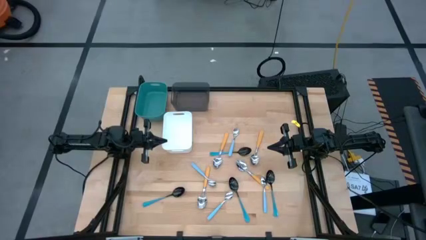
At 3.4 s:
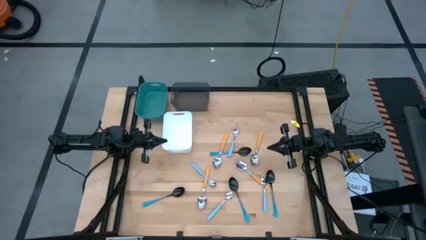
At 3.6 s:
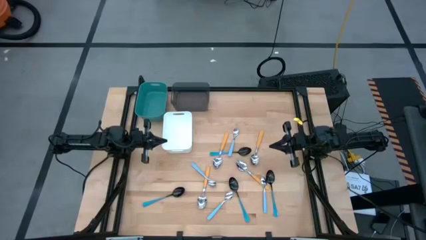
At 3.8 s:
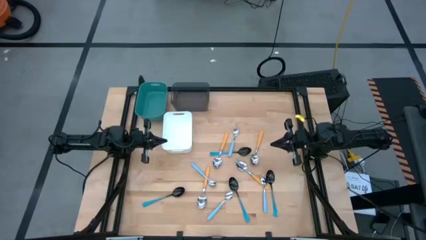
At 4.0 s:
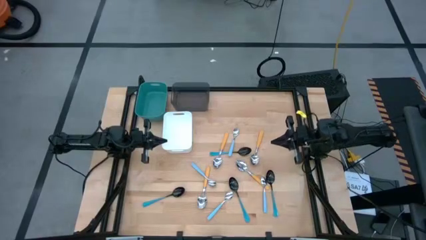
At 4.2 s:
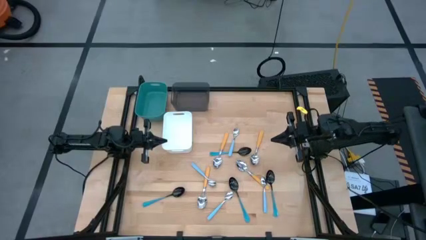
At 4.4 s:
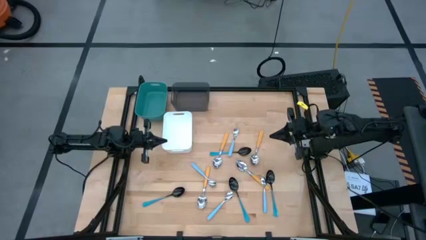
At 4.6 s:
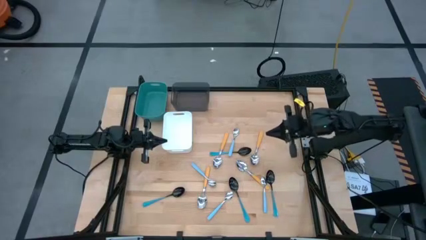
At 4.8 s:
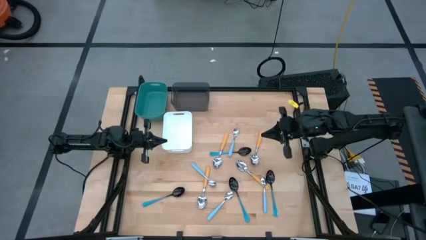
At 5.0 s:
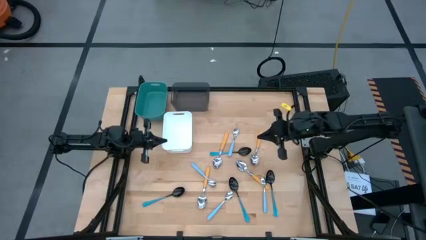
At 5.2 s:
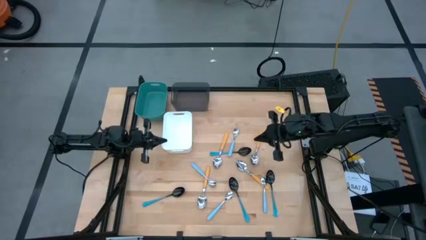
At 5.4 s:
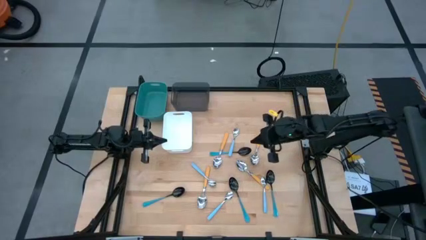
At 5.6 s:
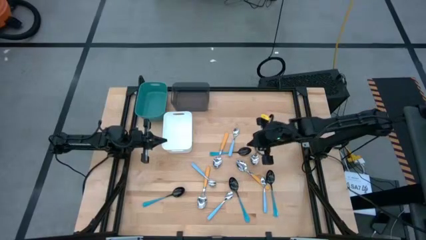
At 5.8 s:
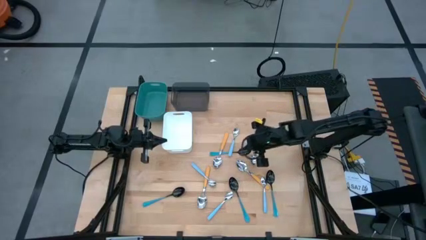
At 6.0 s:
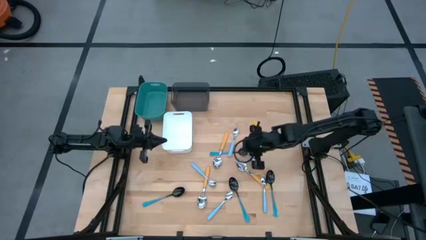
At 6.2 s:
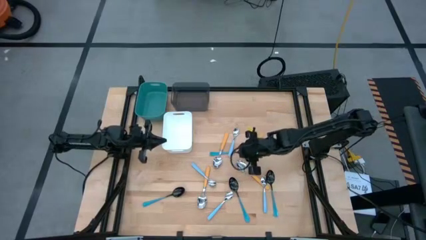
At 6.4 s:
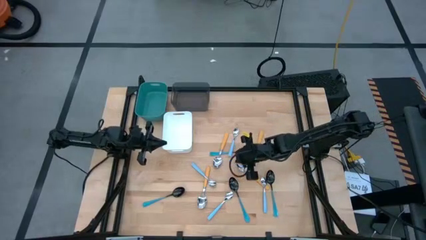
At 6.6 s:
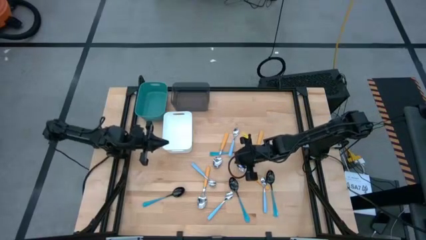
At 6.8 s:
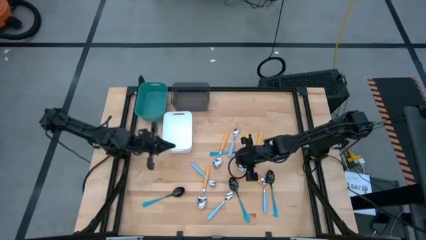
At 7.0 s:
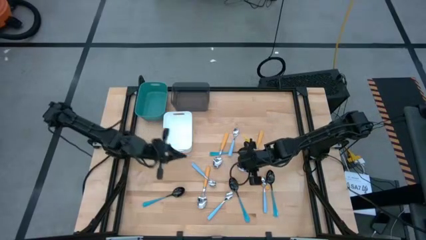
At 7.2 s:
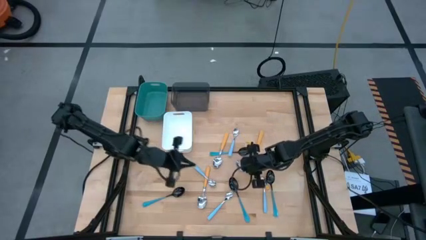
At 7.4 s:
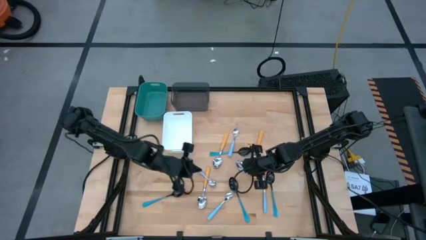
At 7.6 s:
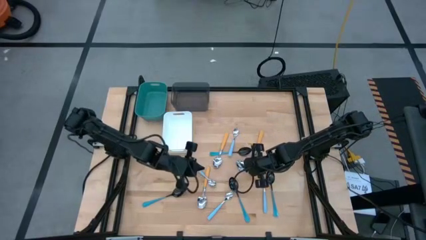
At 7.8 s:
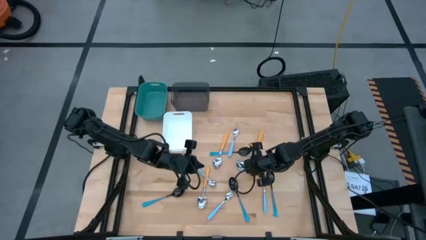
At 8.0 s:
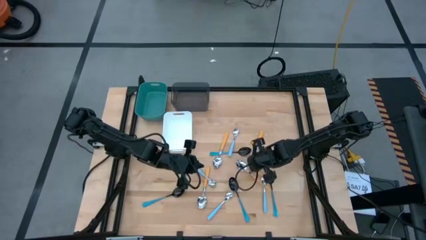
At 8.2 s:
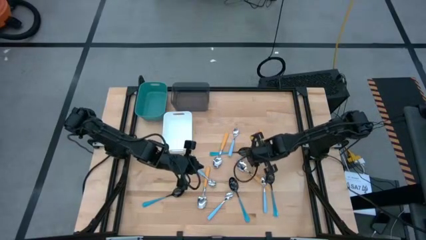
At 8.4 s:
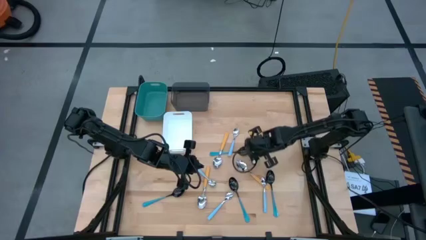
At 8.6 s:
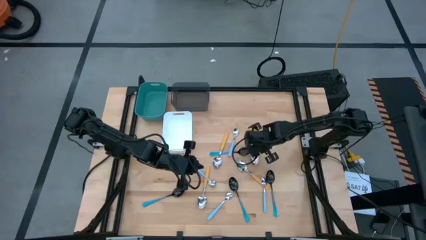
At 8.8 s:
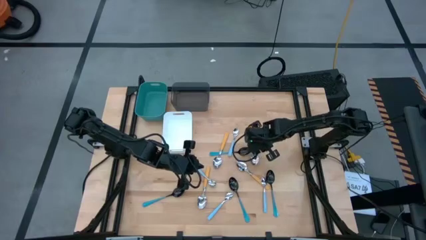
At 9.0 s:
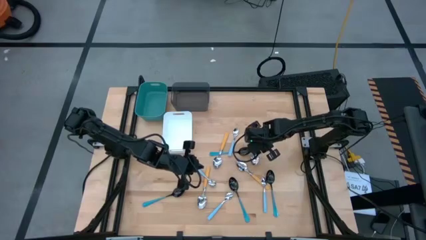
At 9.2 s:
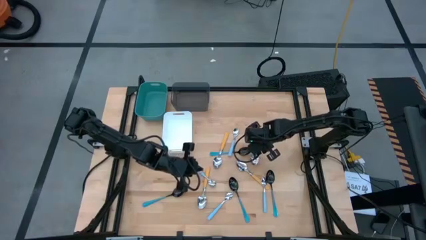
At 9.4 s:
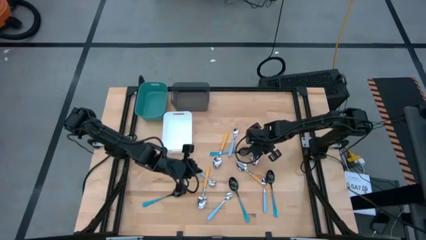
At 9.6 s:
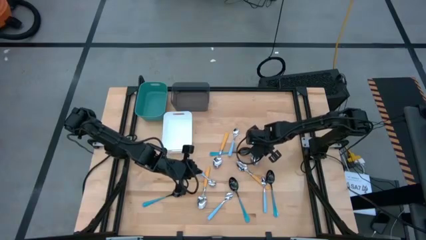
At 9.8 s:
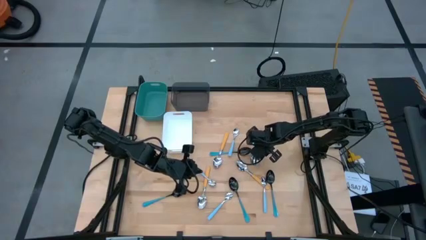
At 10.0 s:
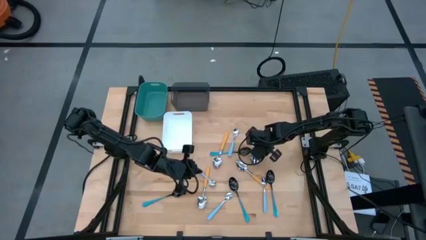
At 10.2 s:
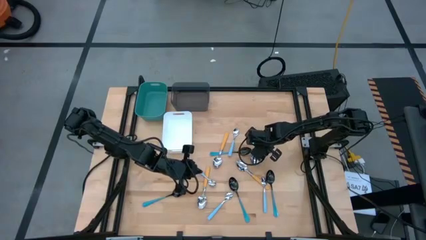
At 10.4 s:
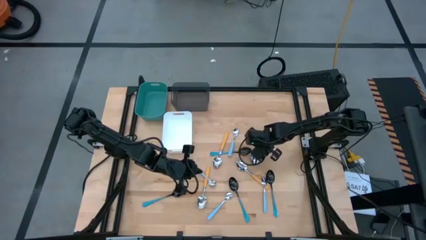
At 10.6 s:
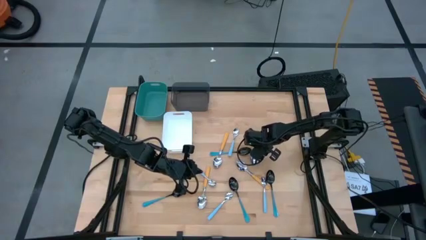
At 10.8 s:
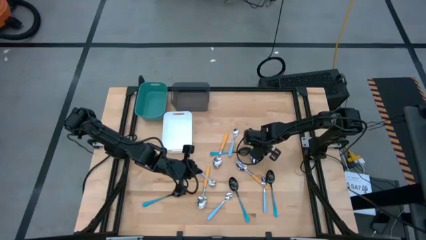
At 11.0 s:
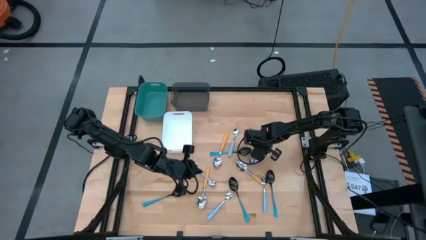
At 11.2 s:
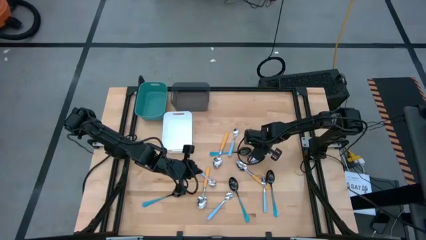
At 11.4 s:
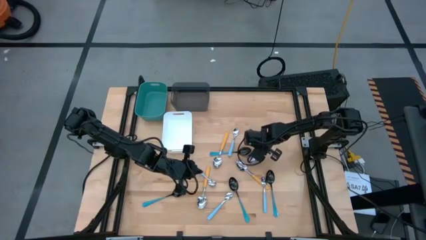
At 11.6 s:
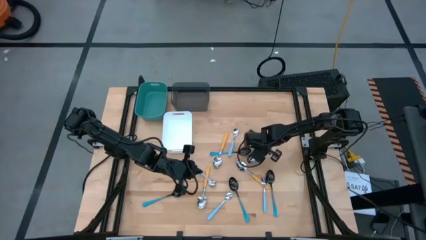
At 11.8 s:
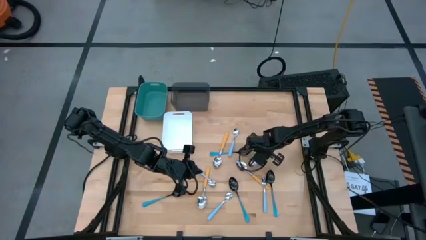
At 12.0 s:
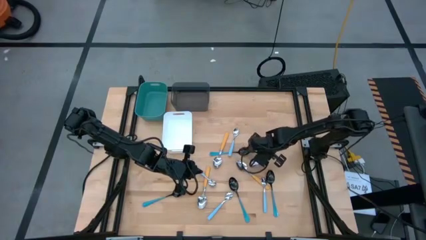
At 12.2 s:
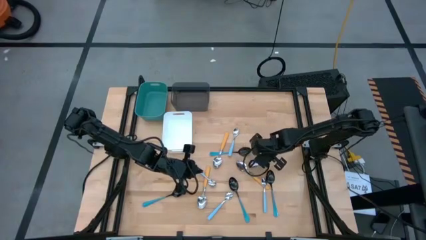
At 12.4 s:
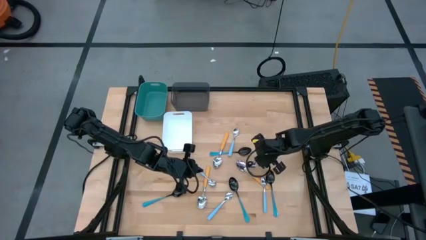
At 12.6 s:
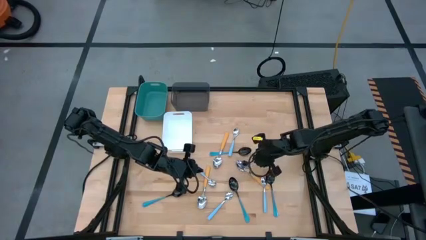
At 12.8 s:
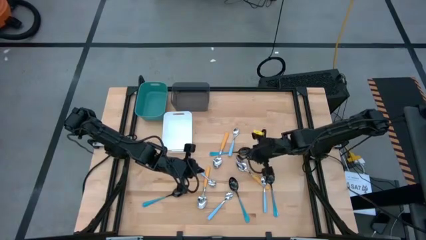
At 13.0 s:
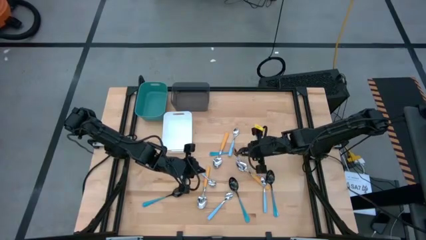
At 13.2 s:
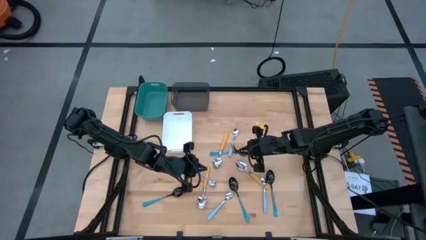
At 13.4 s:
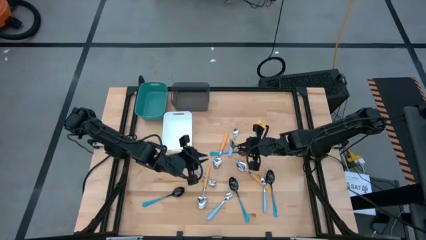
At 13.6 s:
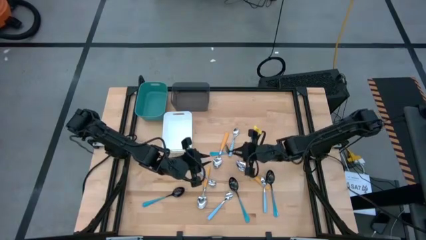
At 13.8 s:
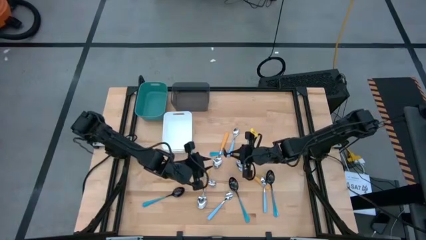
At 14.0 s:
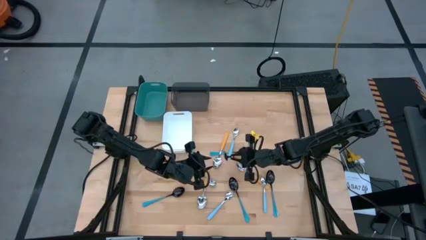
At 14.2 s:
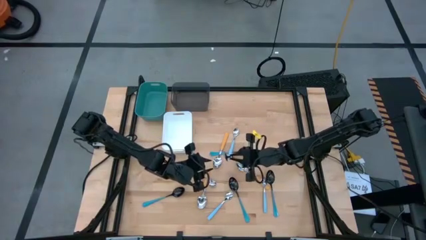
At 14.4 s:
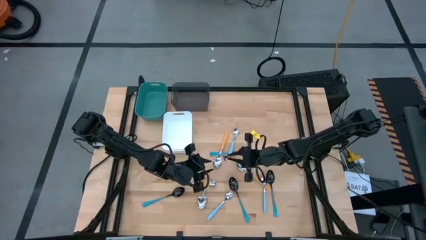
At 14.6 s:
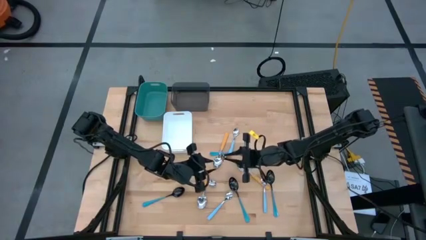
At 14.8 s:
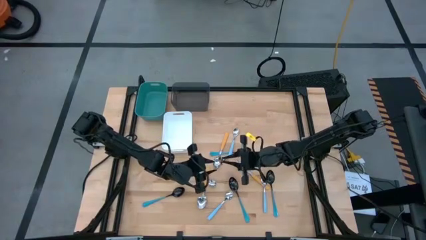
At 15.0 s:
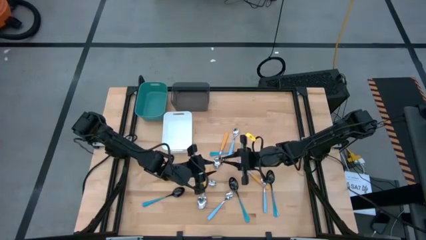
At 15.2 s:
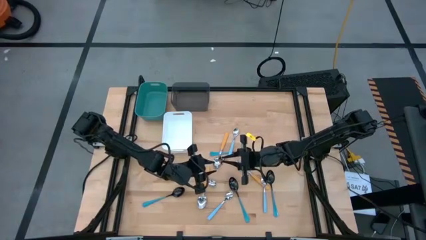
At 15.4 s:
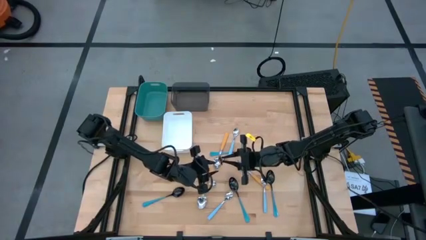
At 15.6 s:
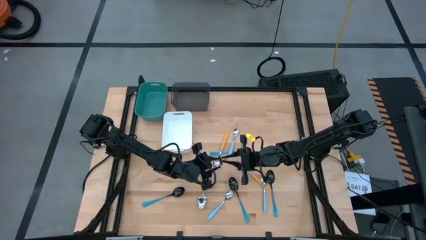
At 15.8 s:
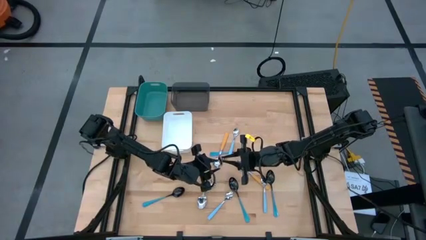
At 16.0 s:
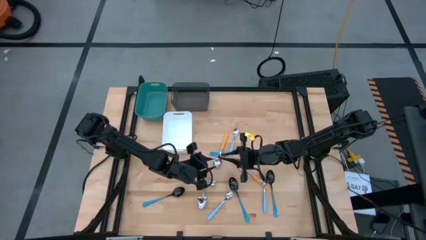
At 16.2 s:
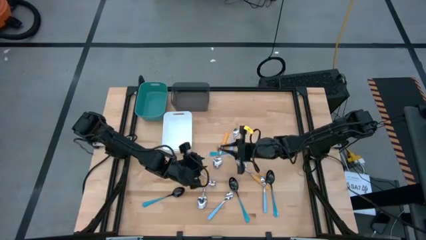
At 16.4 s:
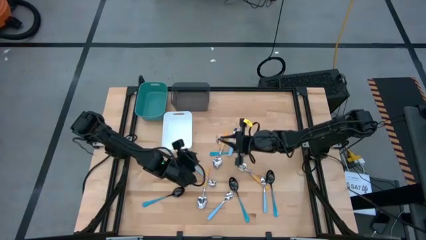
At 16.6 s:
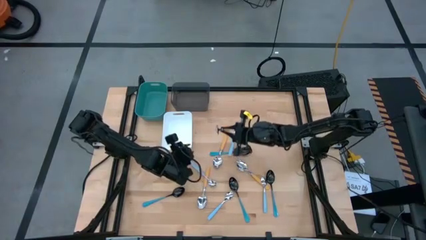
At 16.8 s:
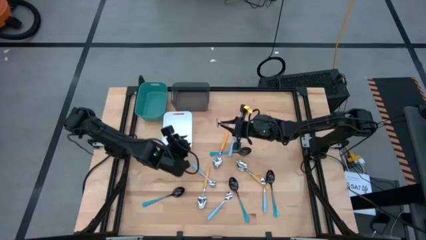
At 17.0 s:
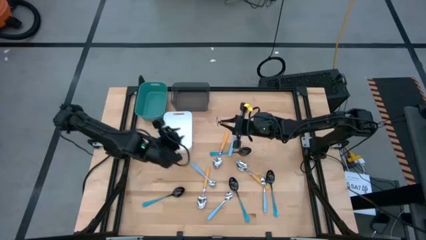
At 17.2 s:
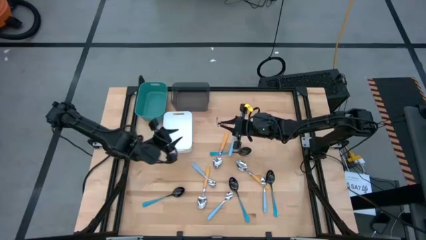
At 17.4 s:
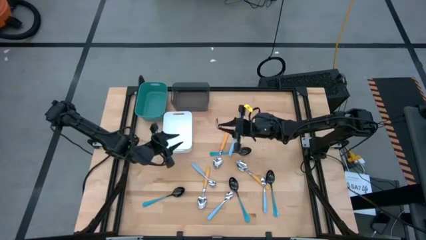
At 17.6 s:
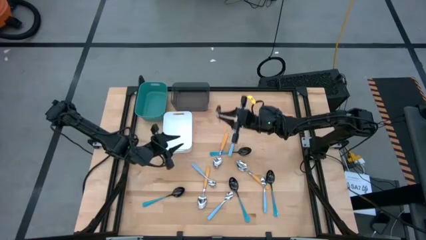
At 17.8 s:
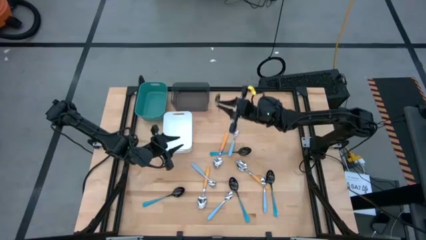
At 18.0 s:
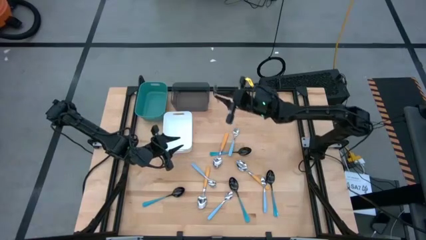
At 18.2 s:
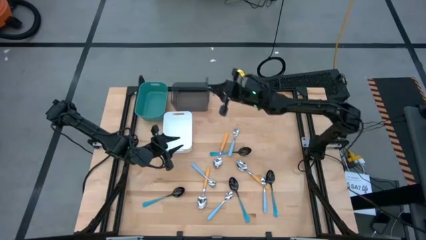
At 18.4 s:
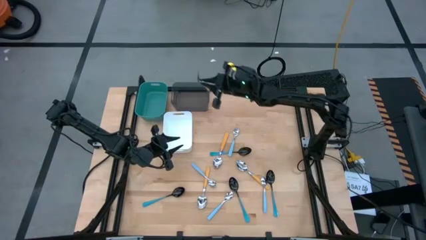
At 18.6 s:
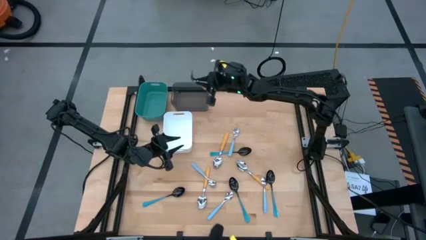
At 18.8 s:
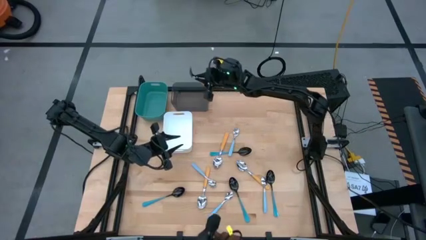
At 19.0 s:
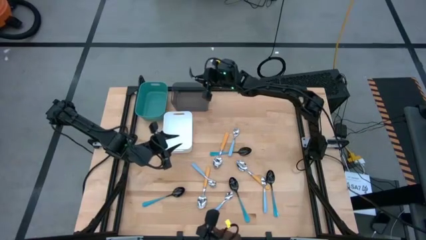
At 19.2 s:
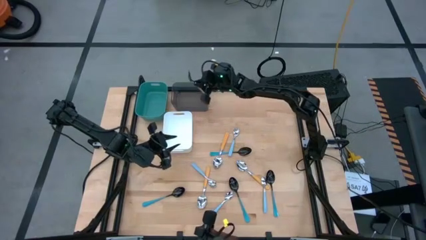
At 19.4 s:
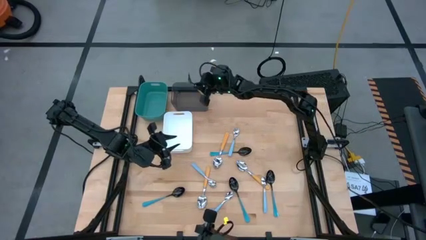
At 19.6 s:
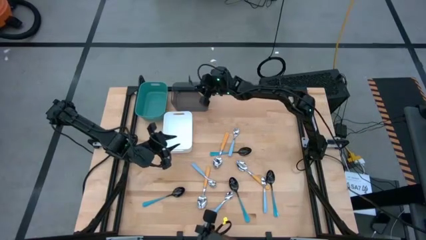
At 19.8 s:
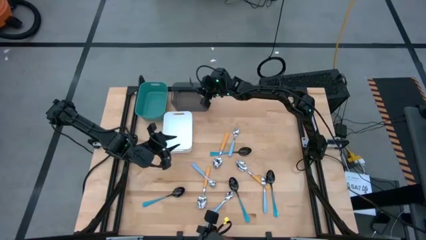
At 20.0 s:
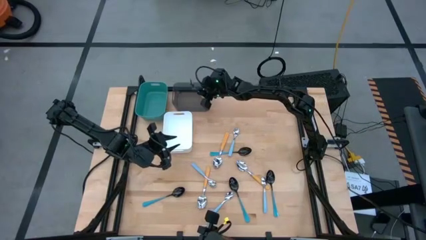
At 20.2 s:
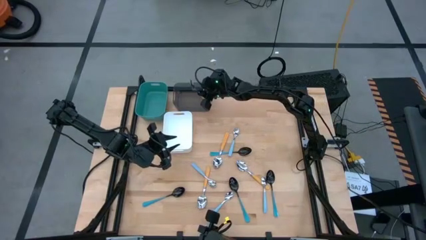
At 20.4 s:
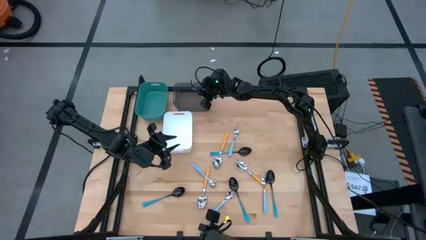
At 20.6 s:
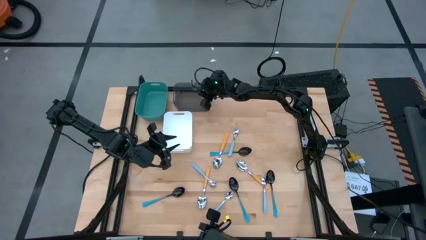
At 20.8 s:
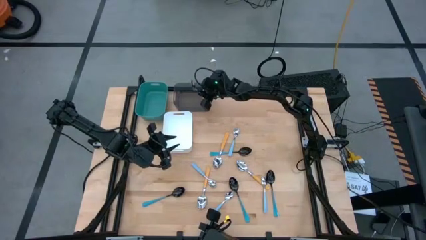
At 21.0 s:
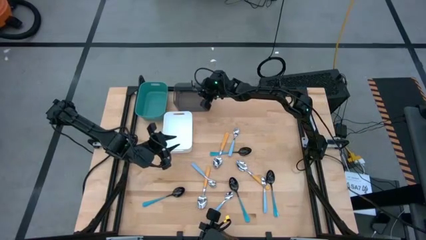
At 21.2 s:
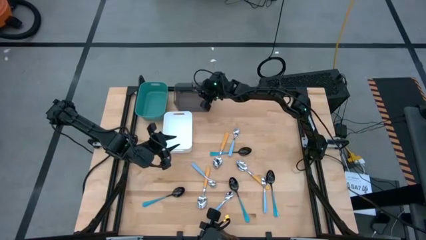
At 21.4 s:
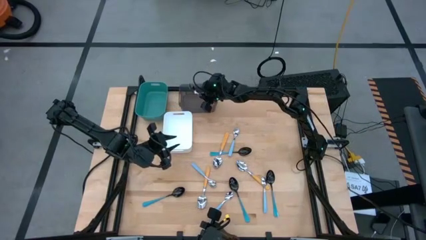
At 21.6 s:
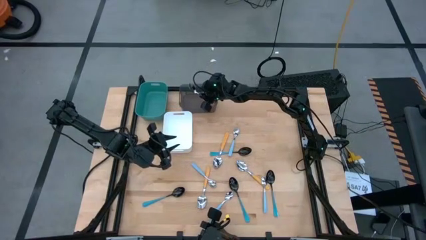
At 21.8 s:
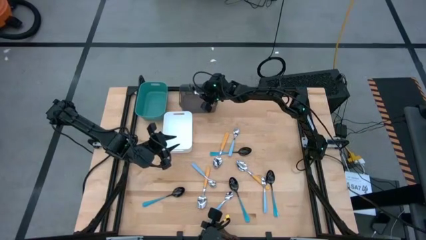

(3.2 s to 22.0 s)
Task: Sort silverware by color (type)
Put the top right orange spoon into the black bin
